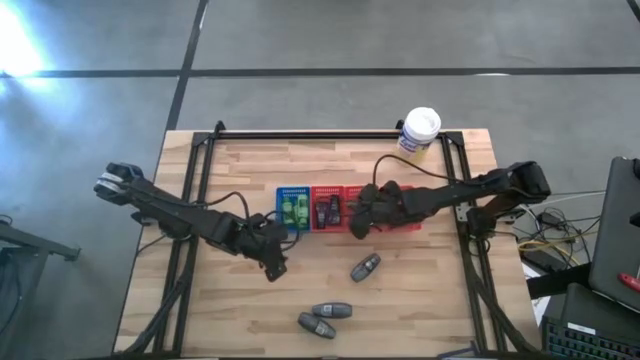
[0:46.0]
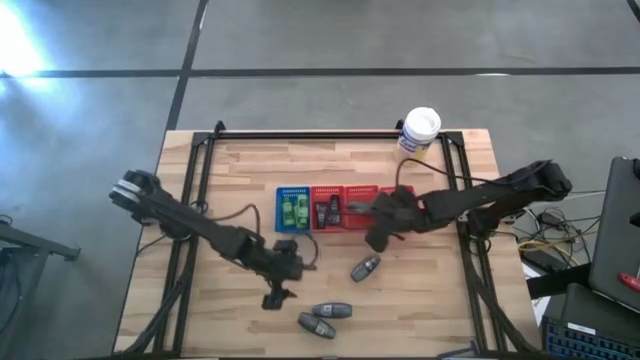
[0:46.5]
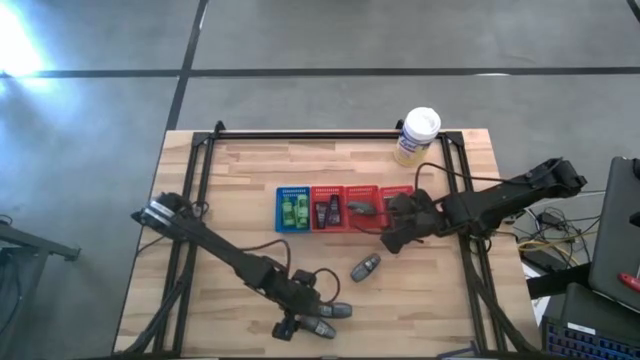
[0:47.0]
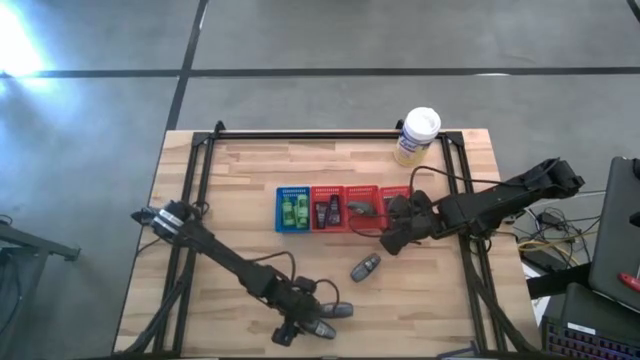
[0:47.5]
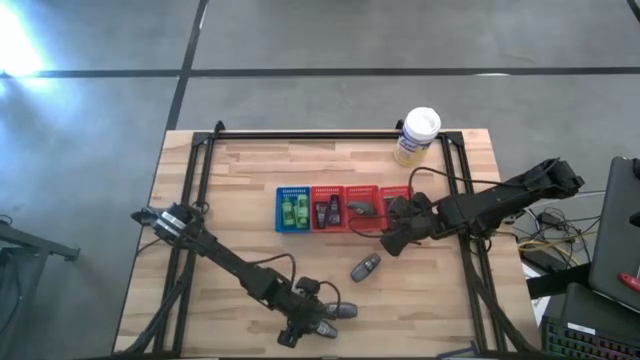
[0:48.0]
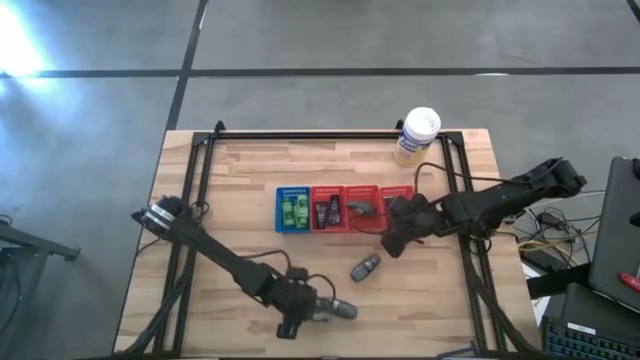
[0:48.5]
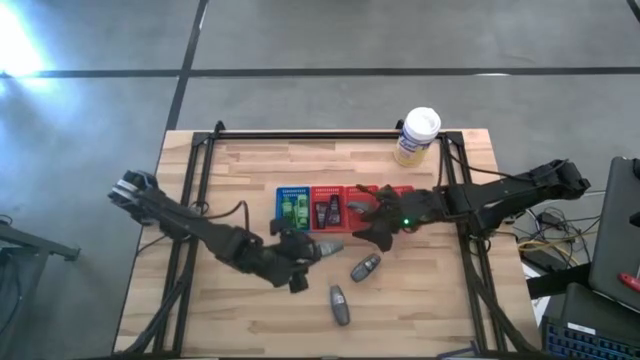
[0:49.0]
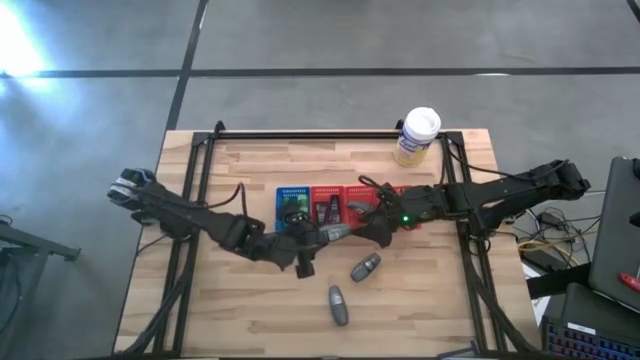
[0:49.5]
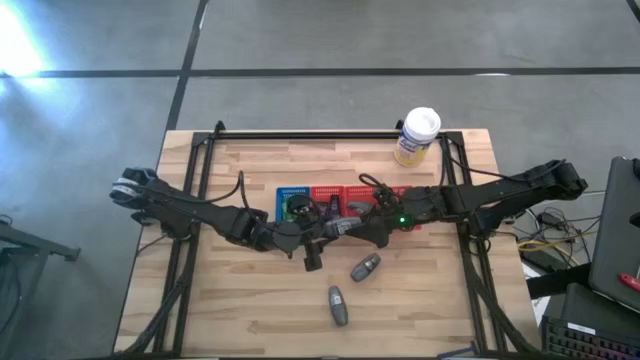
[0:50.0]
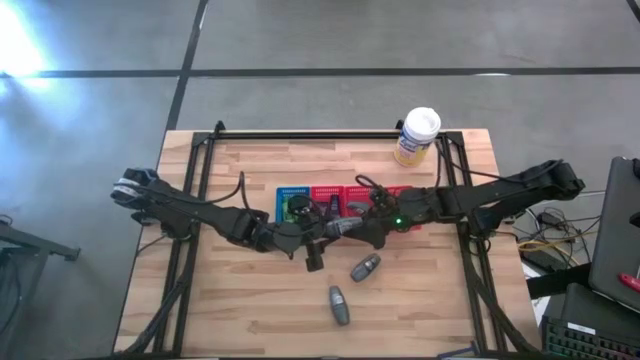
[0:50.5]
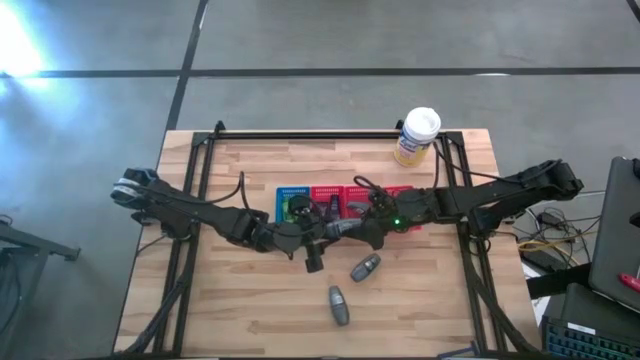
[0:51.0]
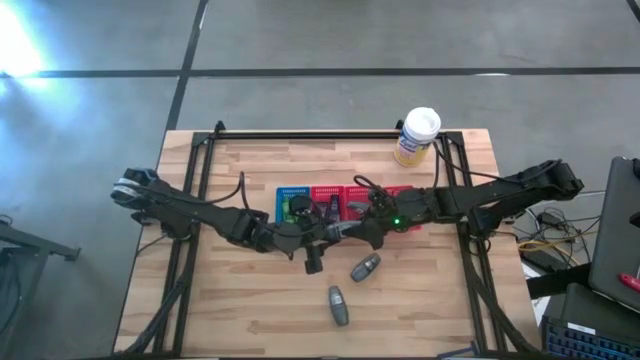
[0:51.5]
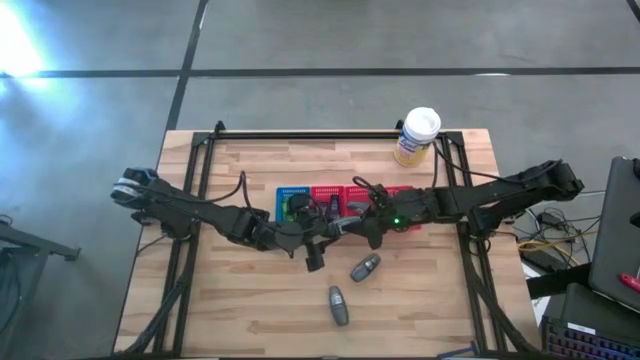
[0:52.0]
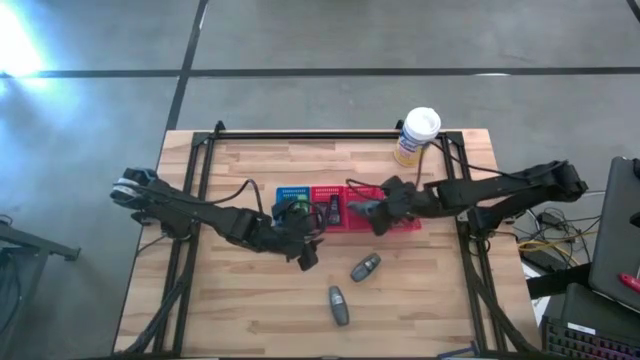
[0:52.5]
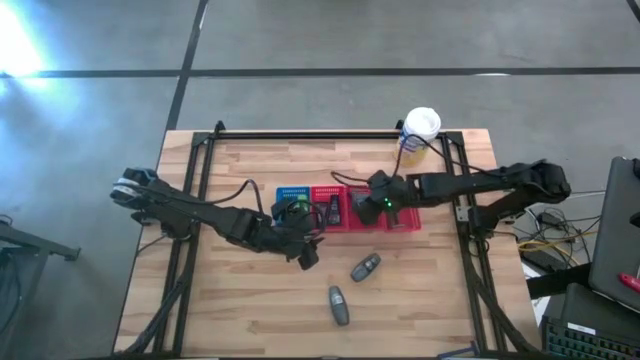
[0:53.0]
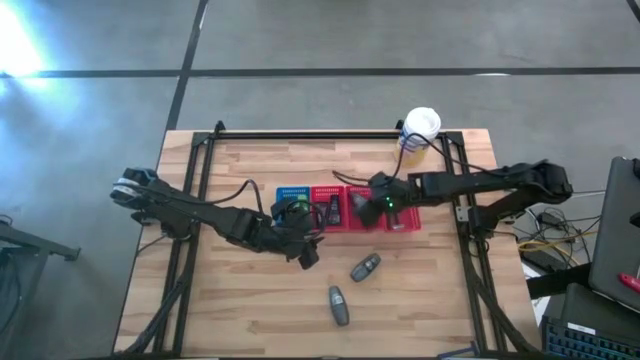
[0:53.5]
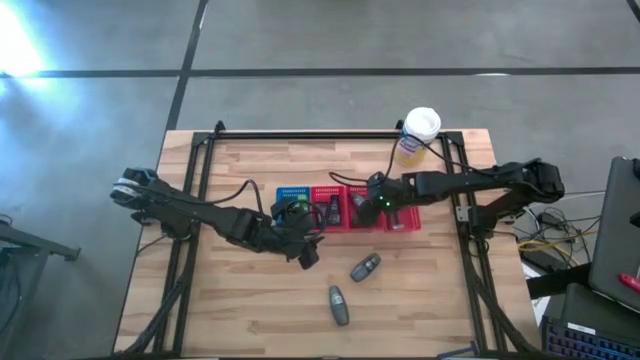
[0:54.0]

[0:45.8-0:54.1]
Task: Pick & Place Travel size toiletries
Put the gray deodorant into the middle red bin

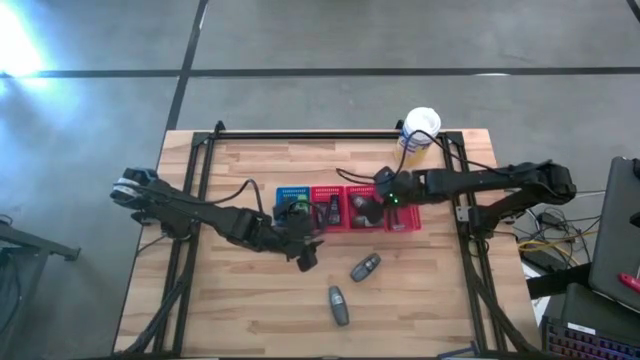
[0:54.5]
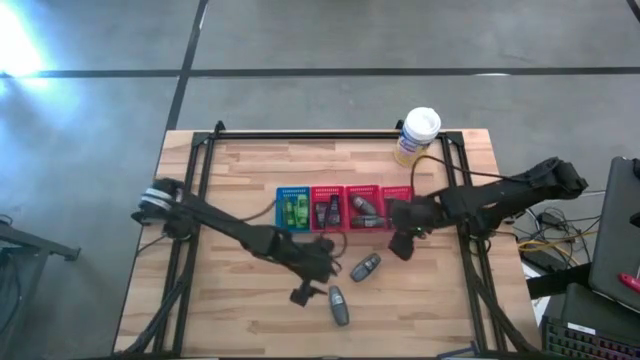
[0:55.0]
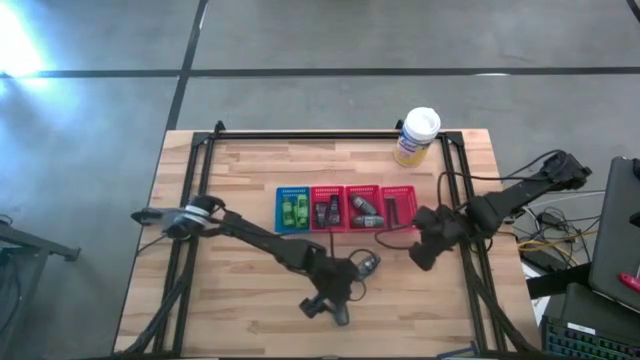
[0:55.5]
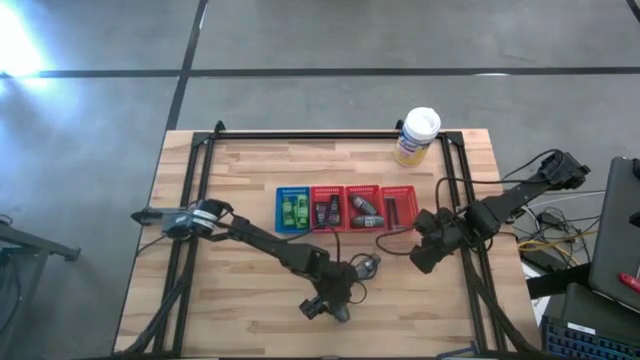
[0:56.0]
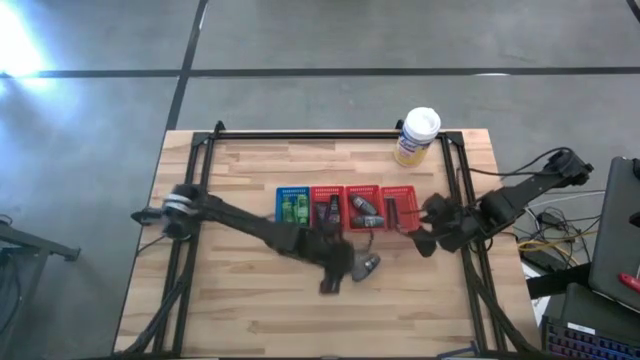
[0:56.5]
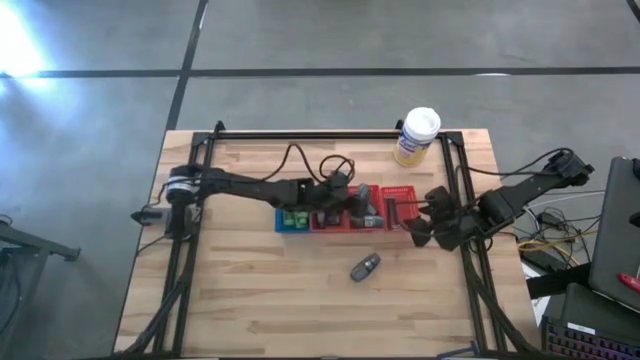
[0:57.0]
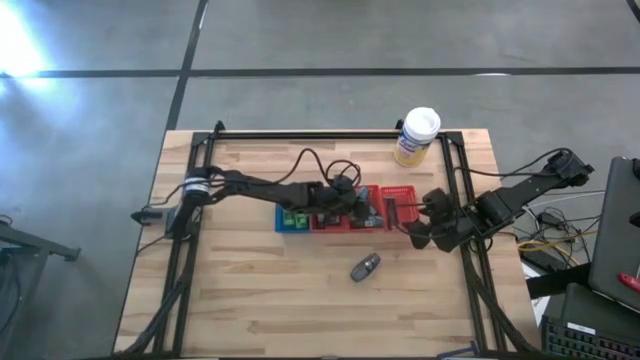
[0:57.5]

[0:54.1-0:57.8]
Put the gray deodorant into the middle red bin

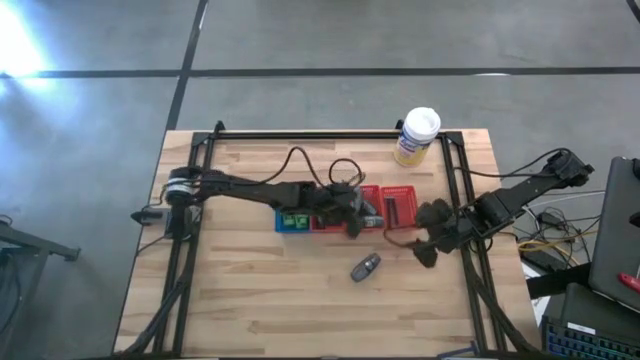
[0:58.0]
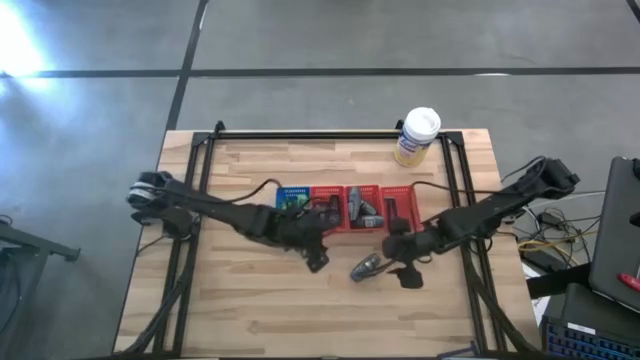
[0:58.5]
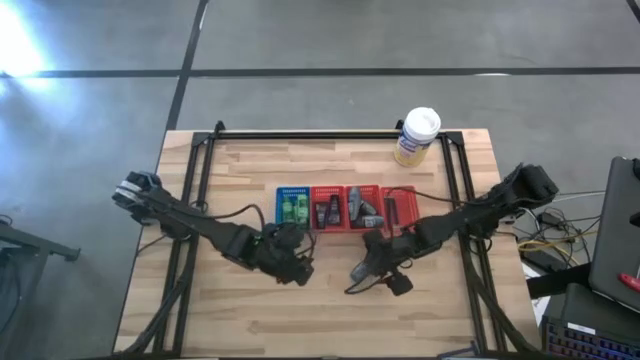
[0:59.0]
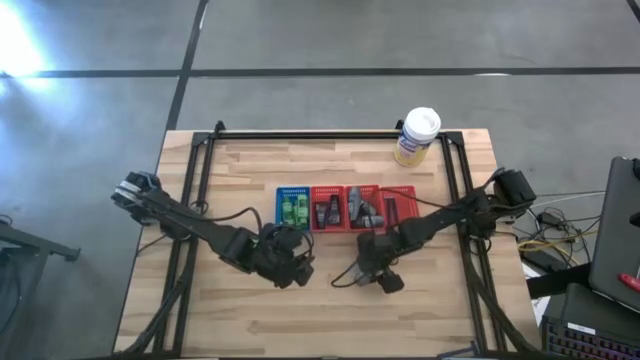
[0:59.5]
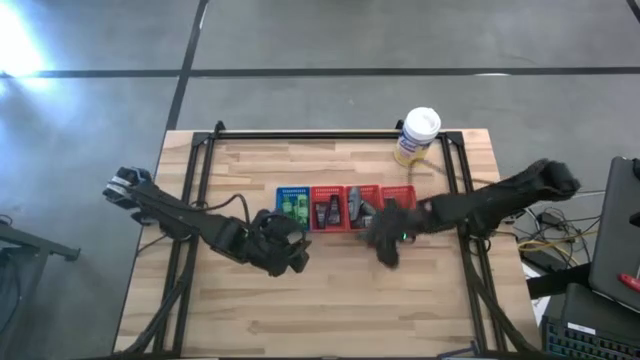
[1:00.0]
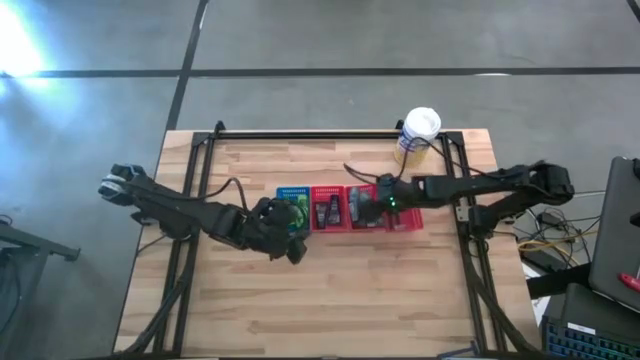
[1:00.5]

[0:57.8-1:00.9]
Put the gray deodorant into the middle red bin

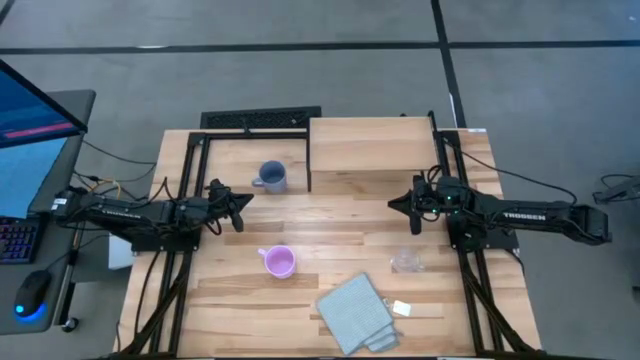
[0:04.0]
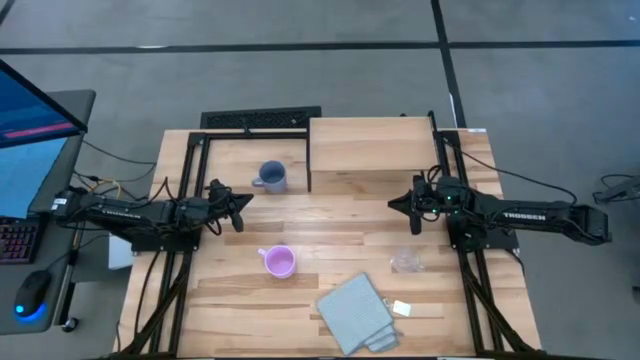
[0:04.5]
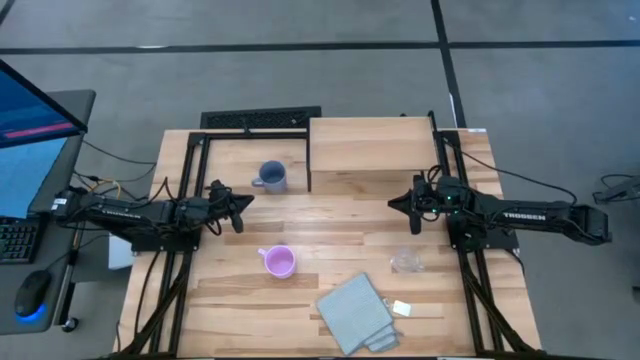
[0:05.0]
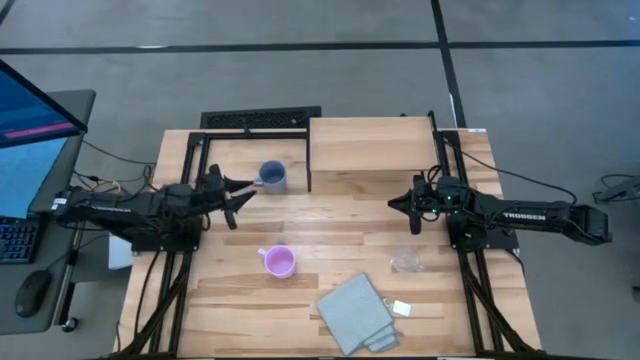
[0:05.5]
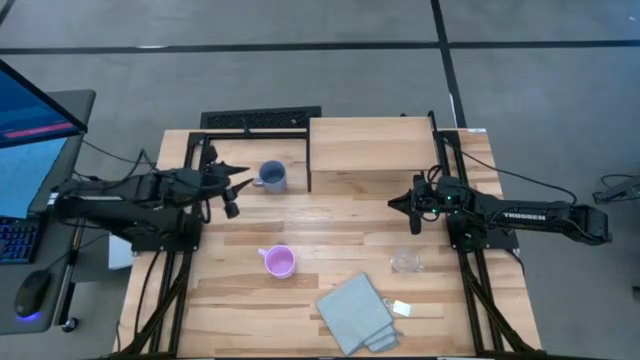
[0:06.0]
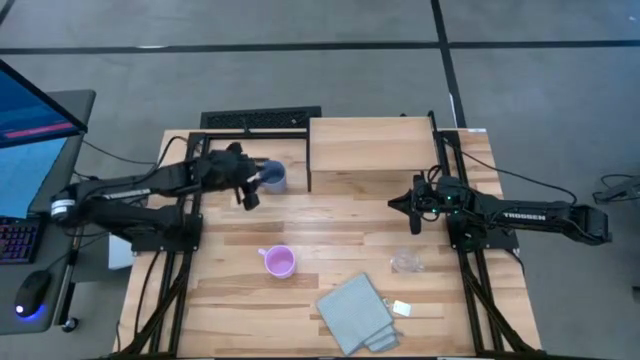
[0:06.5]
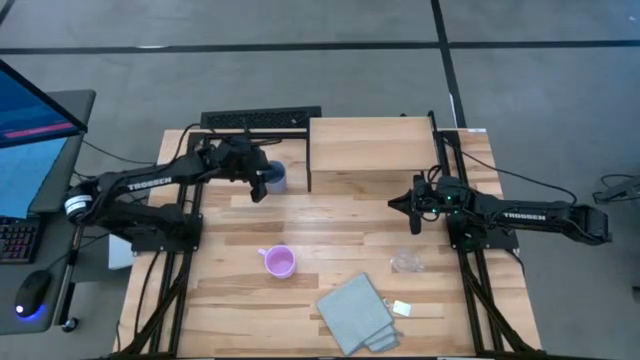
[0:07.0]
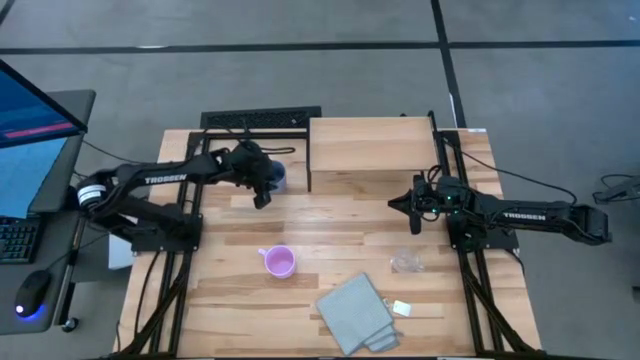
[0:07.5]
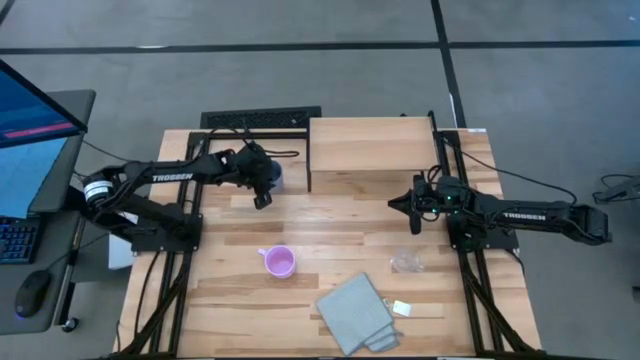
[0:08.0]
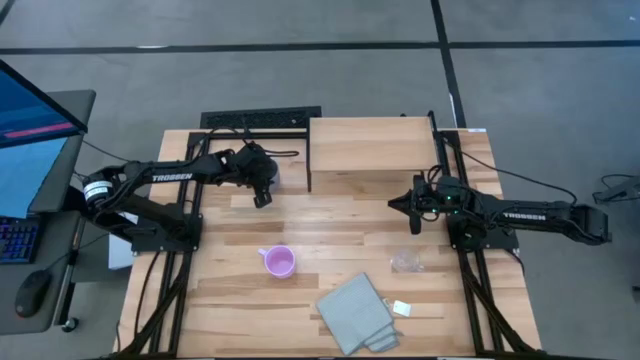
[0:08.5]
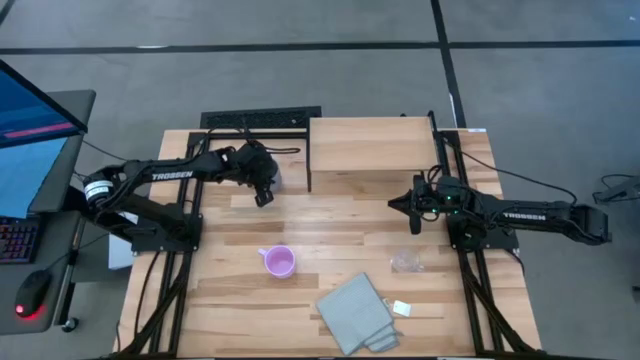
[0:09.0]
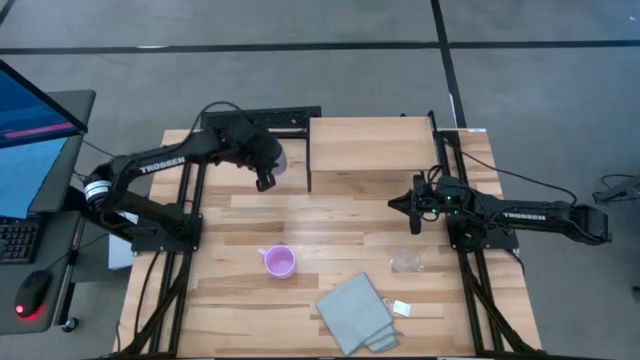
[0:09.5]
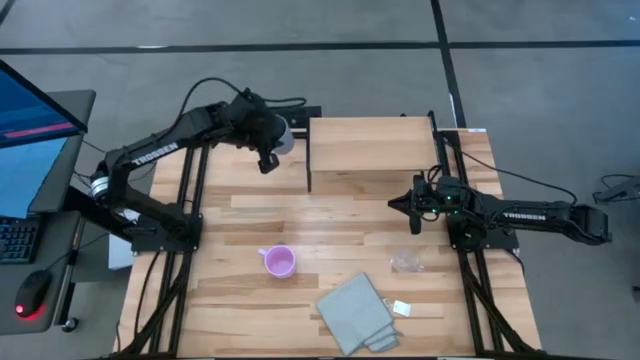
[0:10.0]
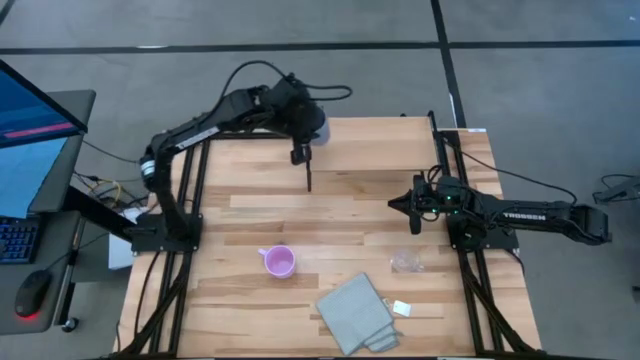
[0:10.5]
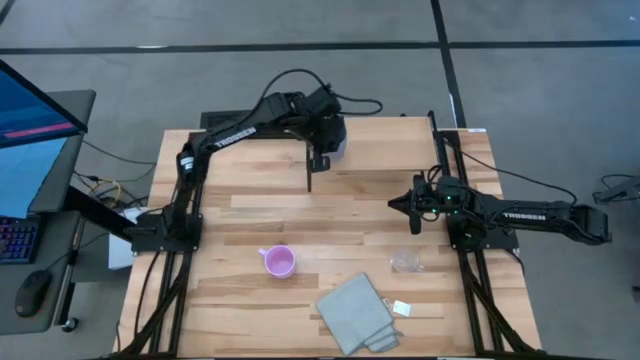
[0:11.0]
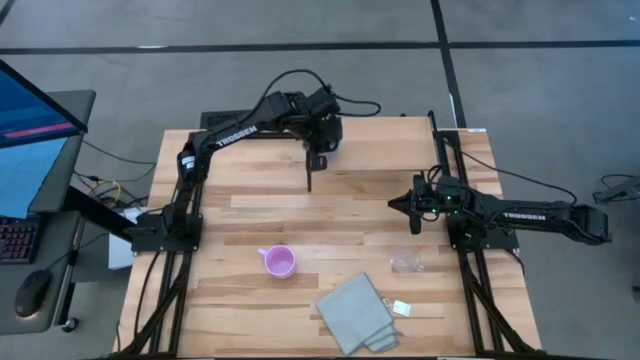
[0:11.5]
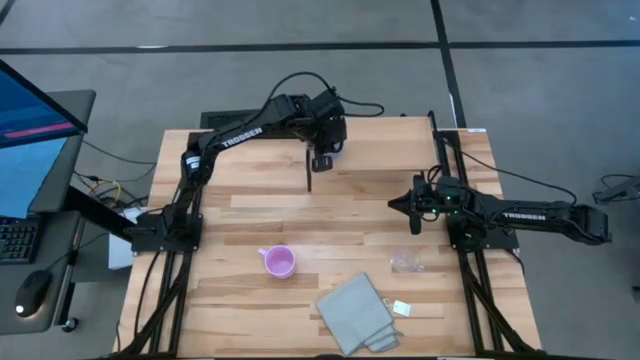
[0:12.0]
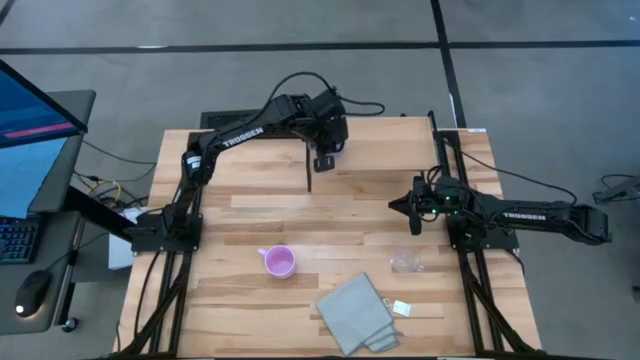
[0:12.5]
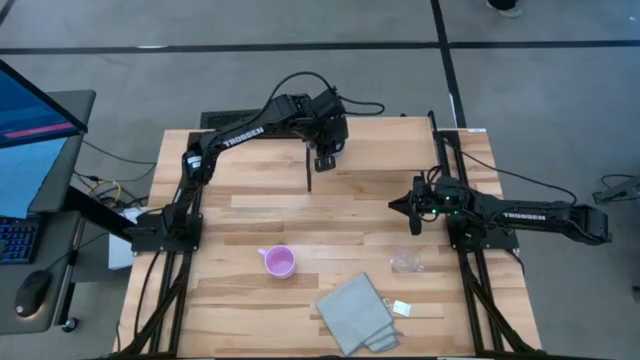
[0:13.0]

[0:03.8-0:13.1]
Task: Stack small to large cups/mugs on shelf
Put the gray mug on the shelf
